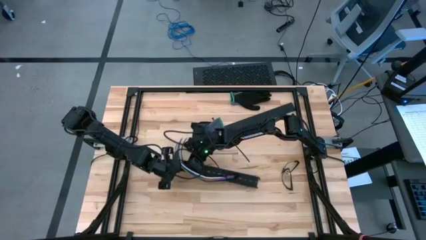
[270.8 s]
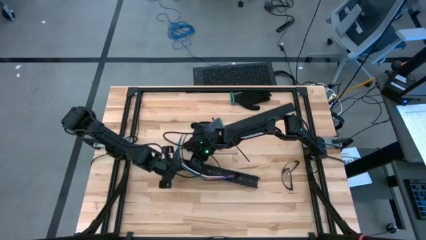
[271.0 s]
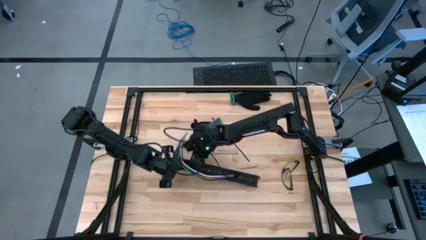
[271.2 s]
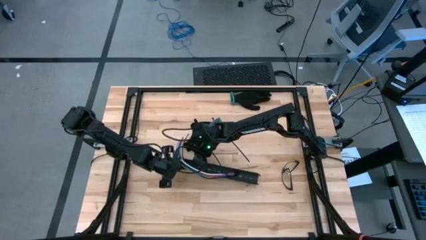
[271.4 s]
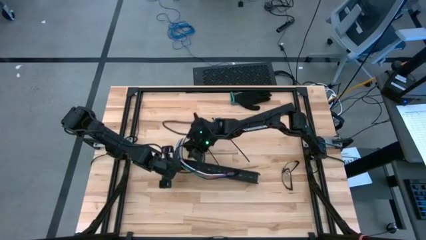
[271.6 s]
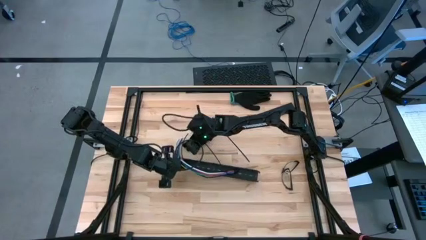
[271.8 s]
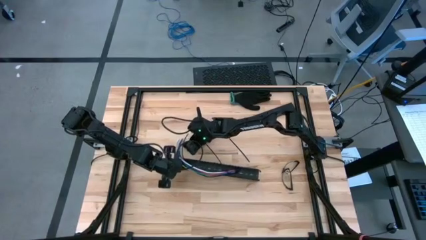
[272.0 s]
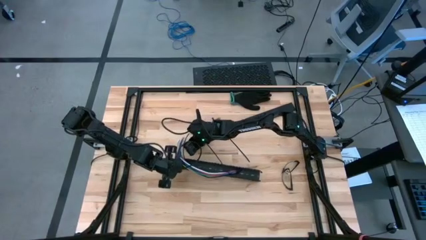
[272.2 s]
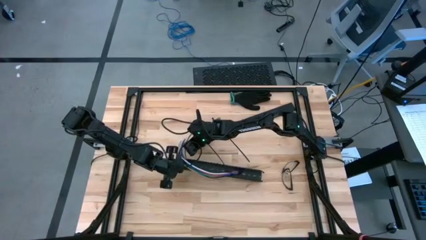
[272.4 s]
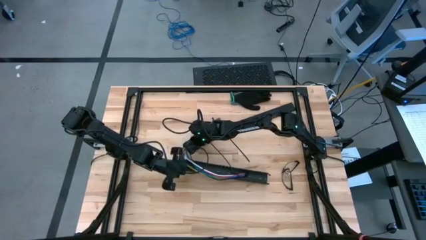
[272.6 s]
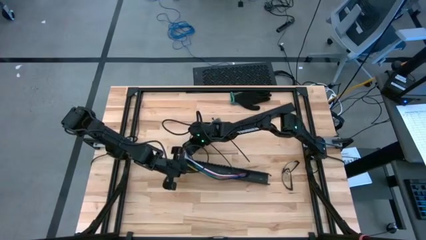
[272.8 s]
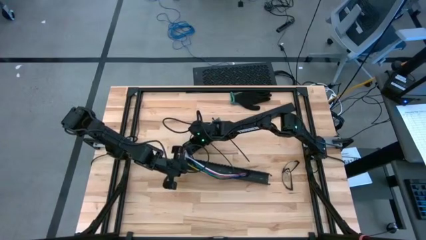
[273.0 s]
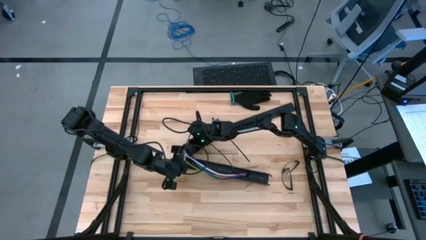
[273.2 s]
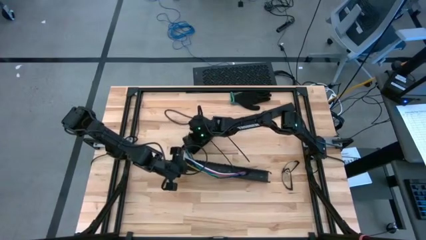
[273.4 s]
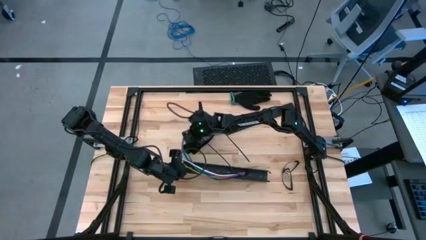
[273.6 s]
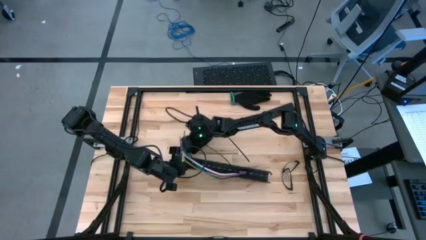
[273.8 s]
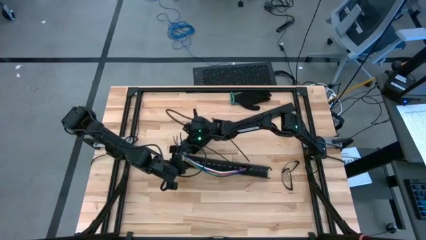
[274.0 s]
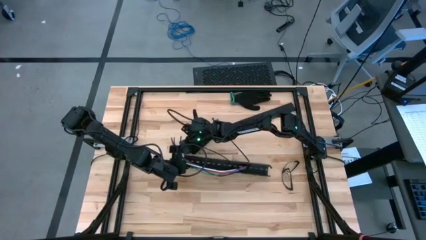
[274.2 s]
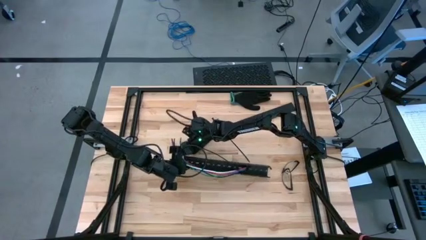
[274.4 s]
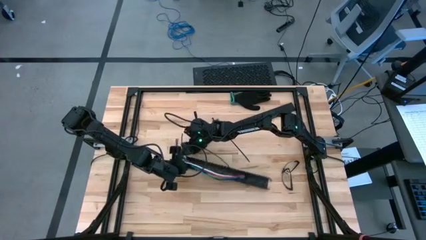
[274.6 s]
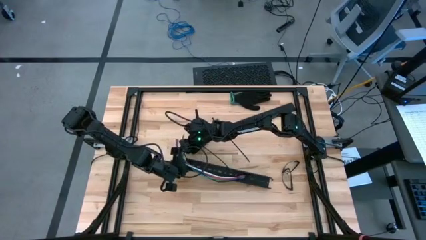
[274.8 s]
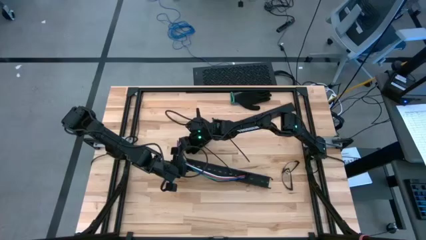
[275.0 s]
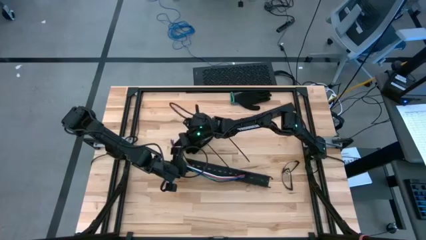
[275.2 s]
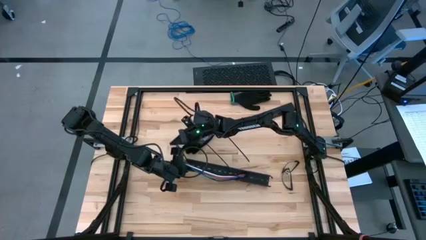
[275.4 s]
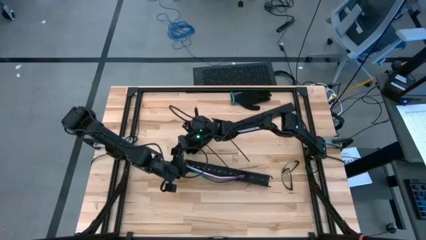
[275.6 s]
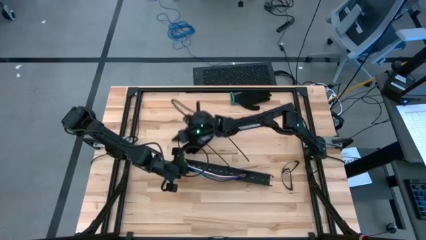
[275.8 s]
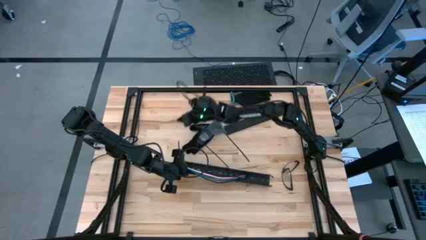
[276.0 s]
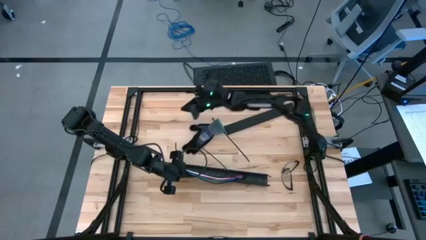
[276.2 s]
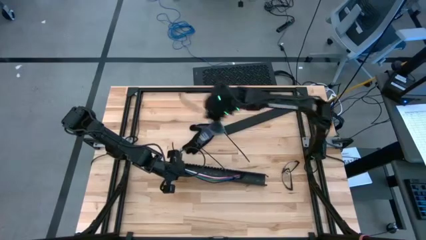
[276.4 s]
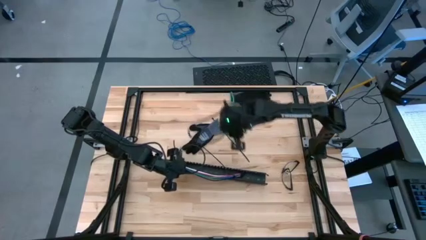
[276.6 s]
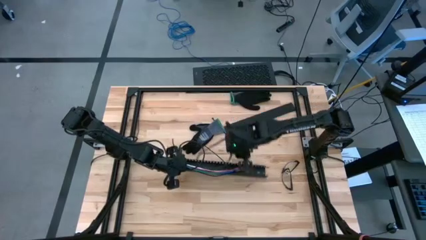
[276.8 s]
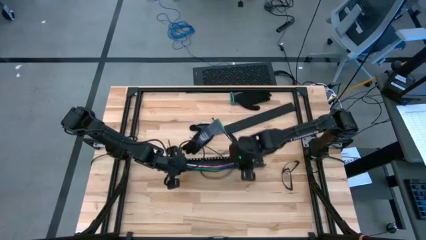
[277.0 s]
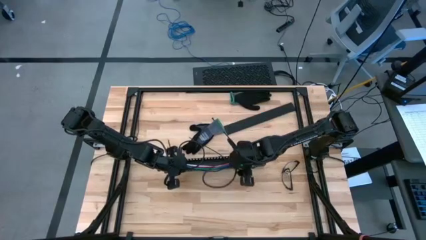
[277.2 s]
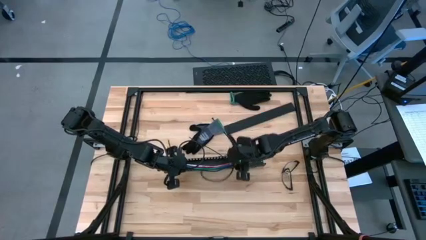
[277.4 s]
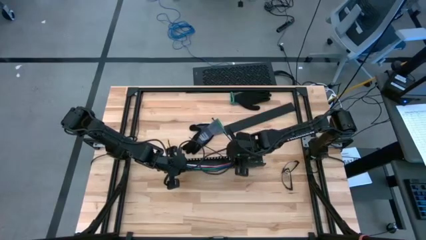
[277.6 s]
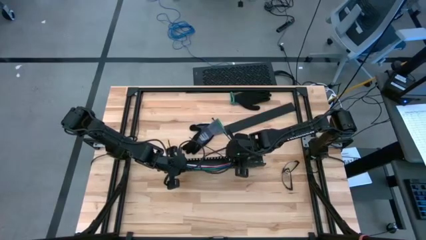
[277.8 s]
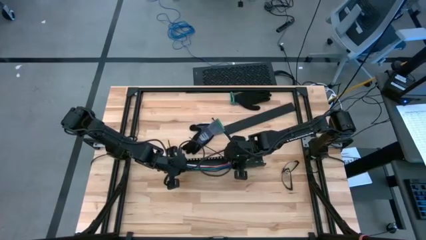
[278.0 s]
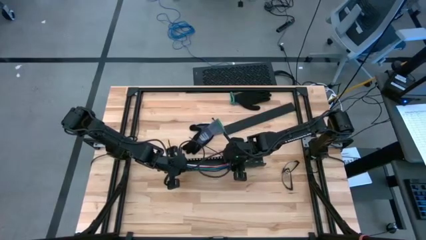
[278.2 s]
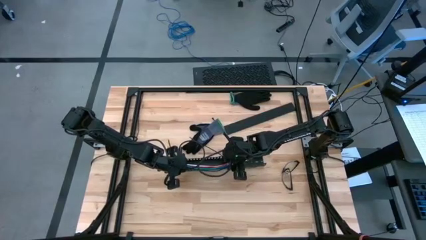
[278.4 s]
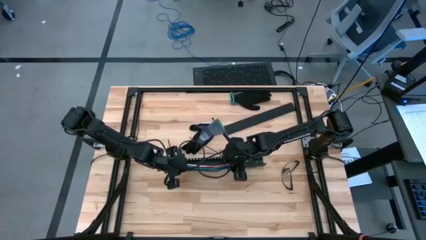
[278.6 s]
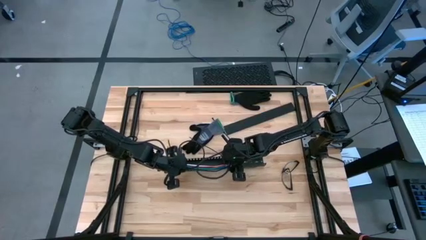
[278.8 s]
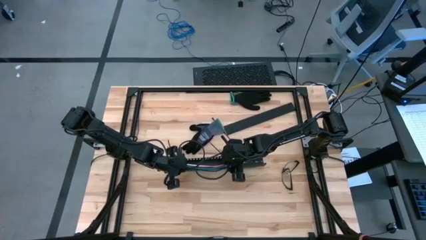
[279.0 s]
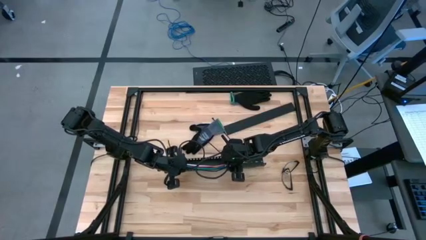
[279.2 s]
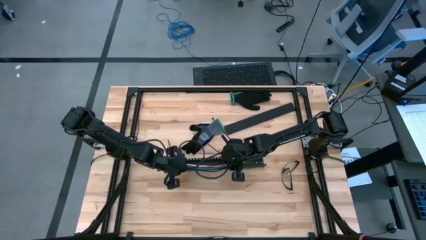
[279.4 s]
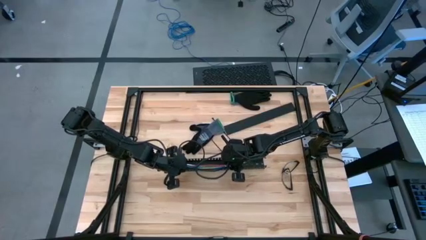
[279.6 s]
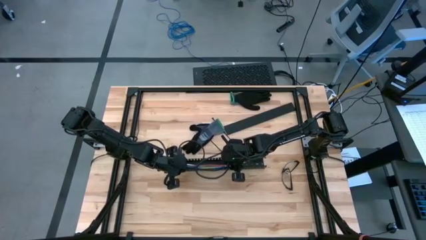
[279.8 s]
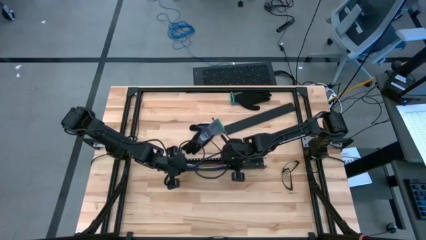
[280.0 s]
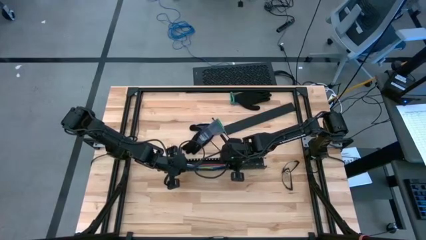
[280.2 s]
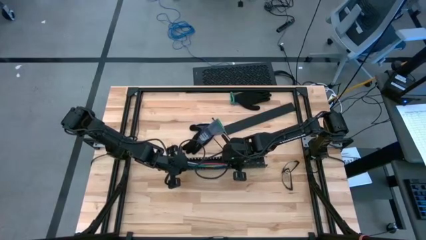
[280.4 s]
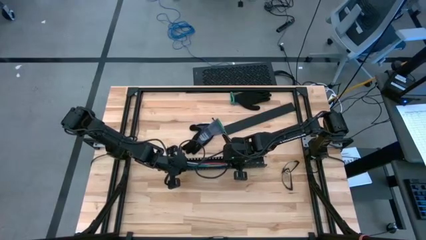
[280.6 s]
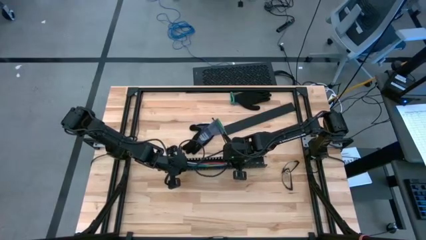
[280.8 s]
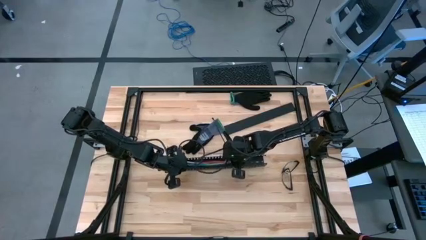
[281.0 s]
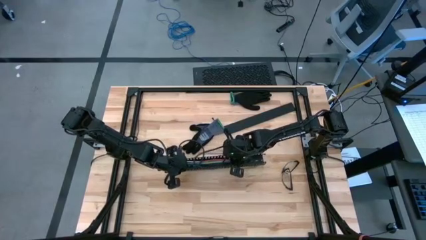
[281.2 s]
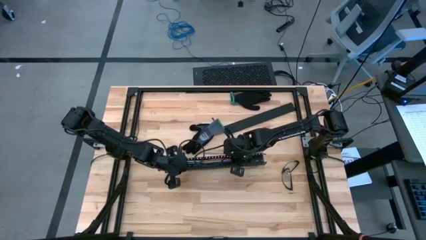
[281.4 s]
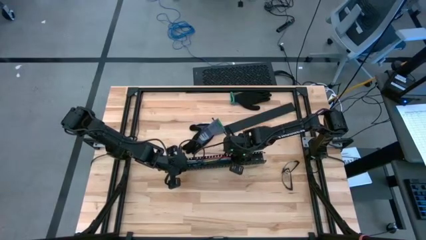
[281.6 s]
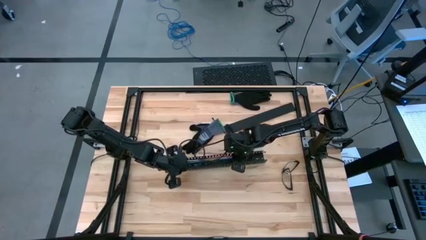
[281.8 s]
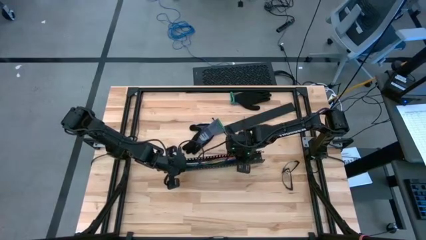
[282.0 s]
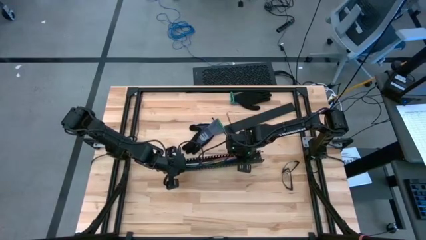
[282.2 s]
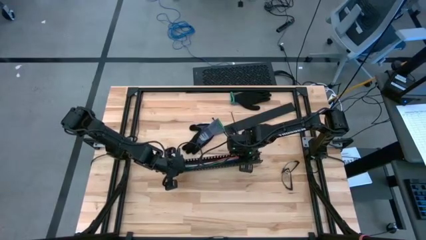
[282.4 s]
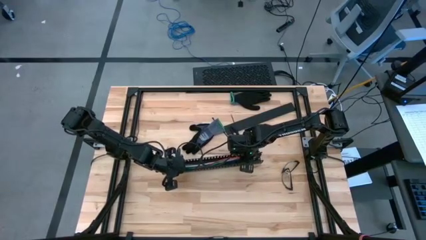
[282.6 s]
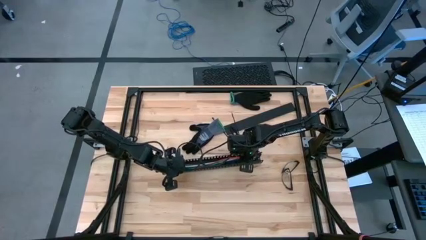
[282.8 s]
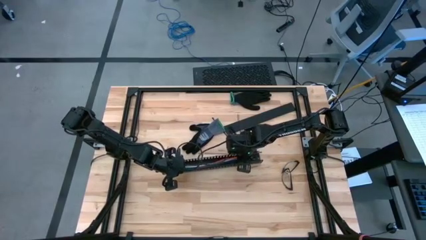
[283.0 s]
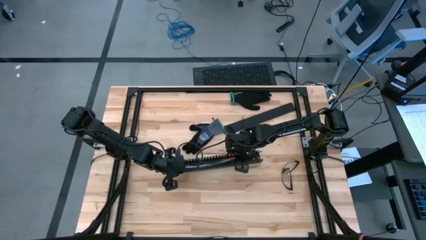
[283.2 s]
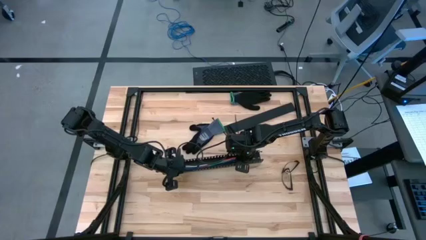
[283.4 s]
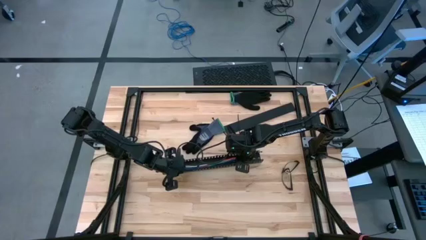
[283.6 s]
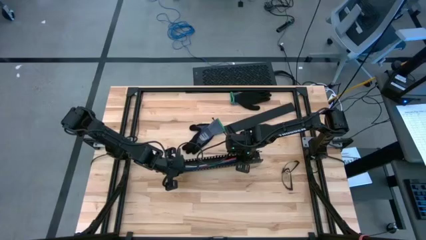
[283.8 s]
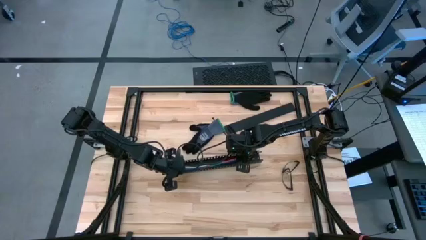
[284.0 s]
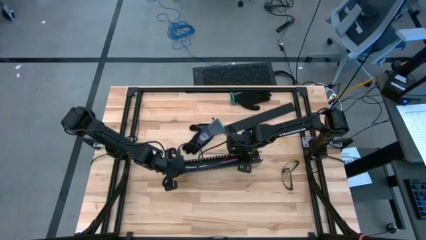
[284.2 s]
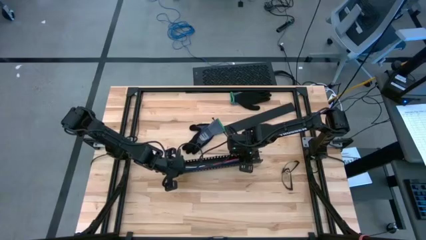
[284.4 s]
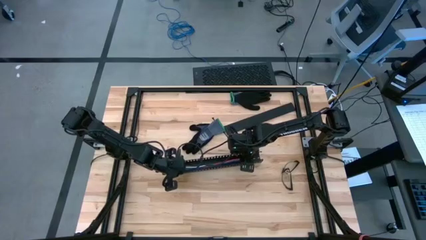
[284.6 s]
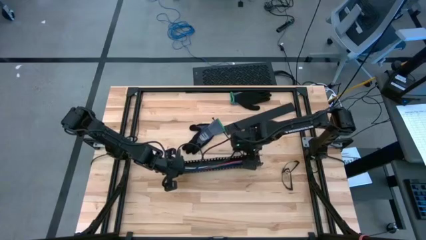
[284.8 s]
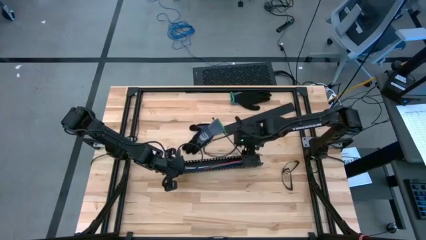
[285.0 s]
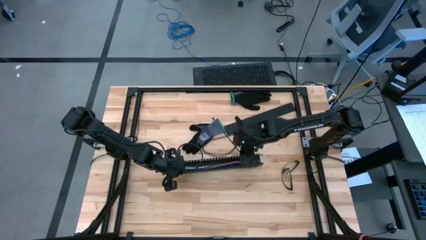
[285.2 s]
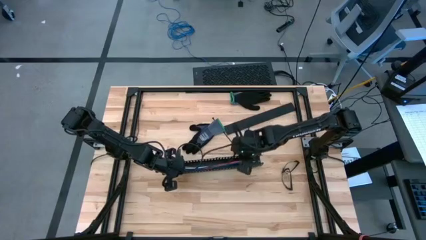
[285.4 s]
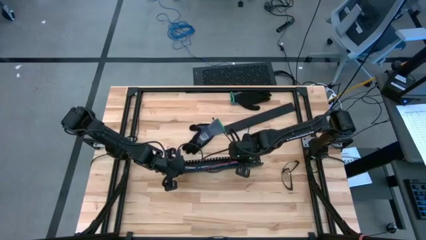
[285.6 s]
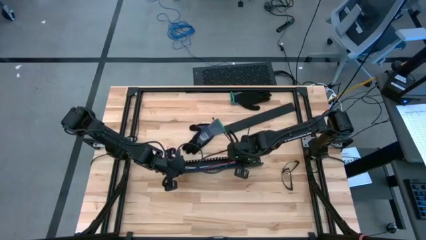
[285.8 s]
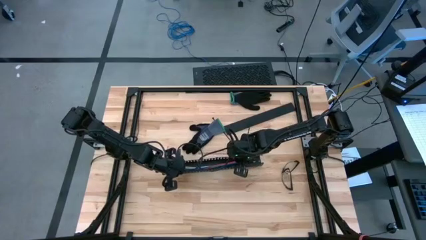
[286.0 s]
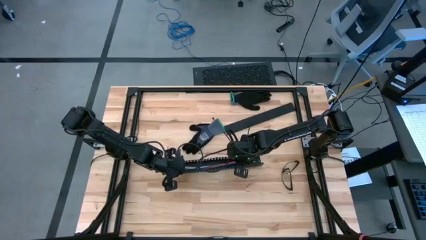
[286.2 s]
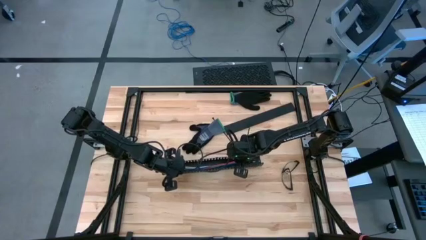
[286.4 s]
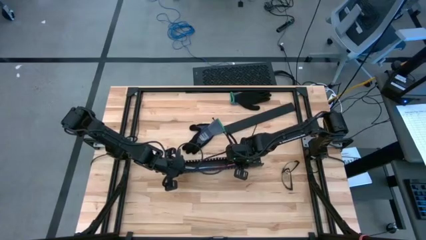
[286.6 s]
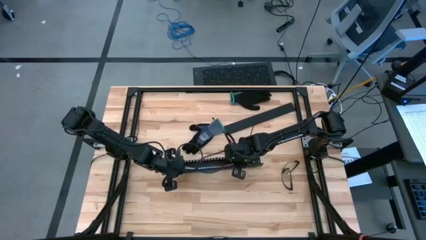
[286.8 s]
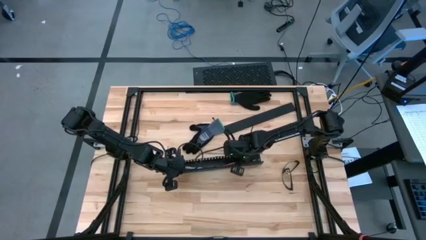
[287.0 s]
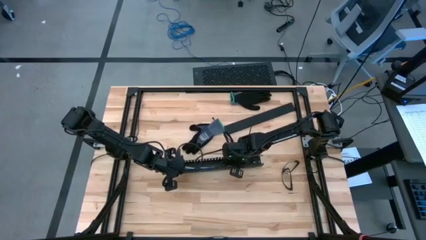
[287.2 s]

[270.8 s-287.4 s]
Task: Ziptie cables
Put the zip tied cable wires into the black cable duct
